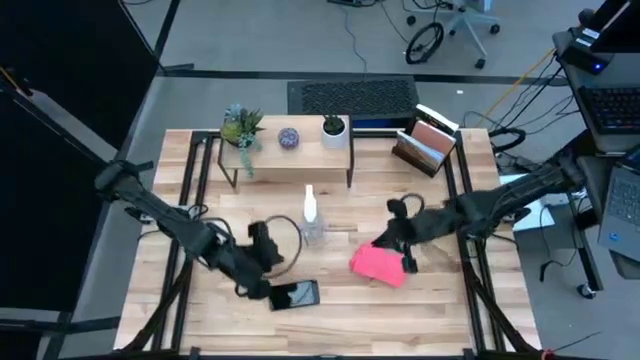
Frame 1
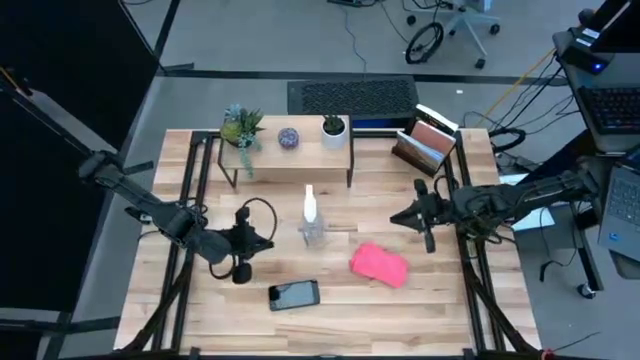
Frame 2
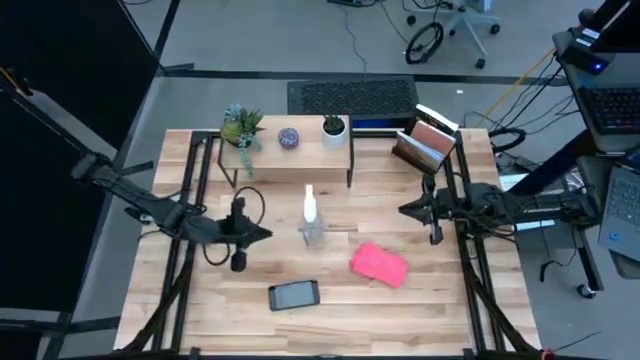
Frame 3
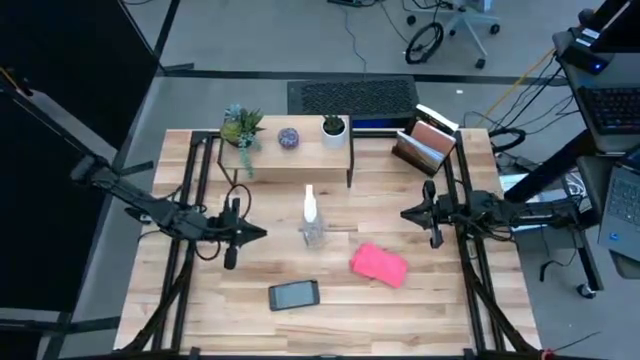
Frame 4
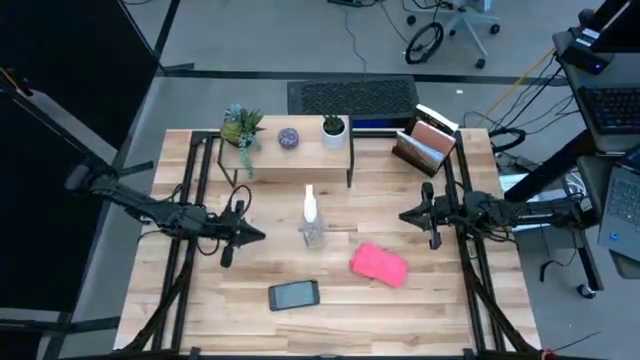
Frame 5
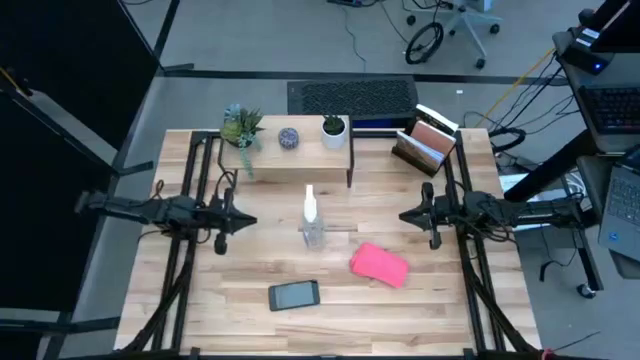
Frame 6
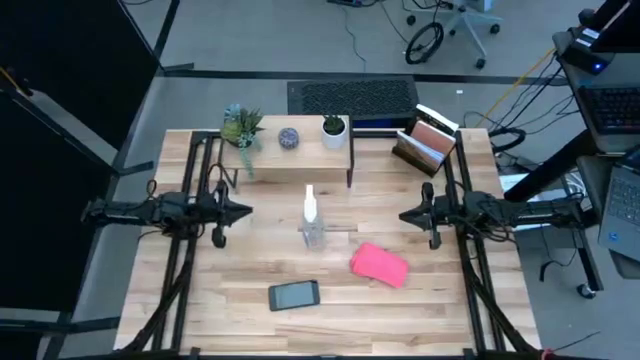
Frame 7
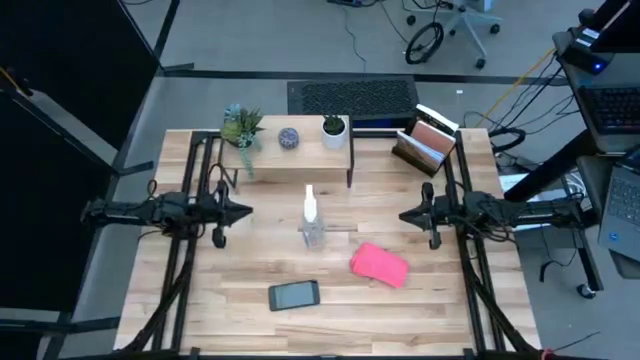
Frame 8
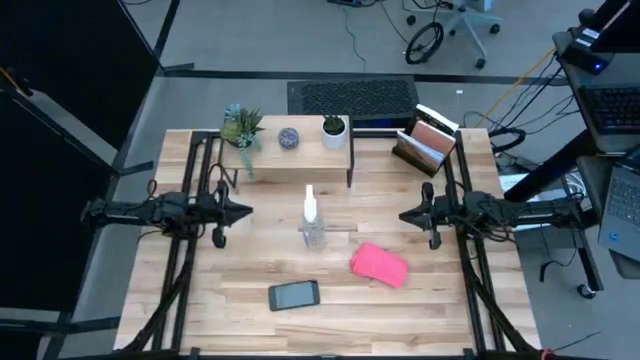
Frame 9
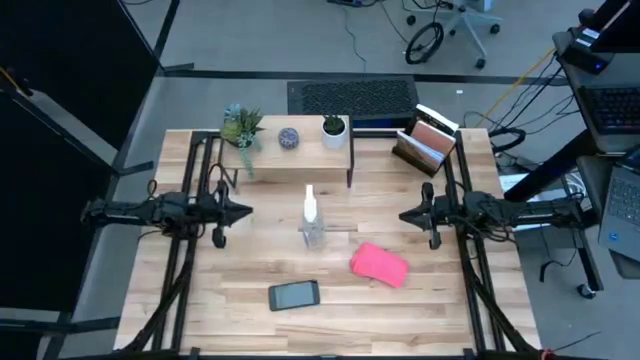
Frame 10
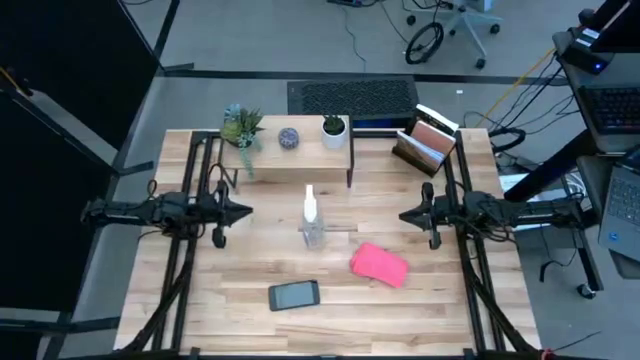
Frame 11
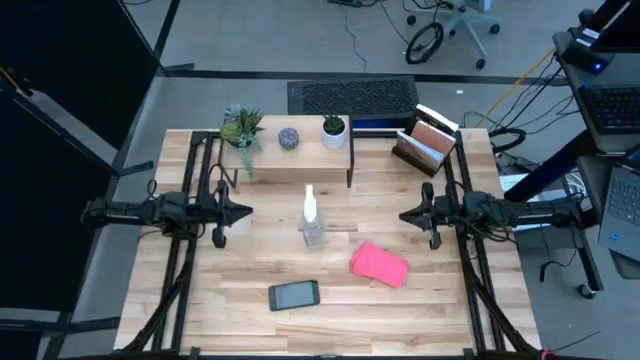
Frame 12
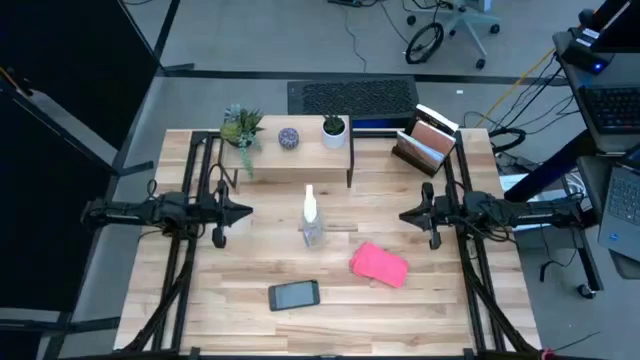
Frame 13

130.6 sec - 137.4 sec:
Task: Apply microfiber cloth
Return to Home Position

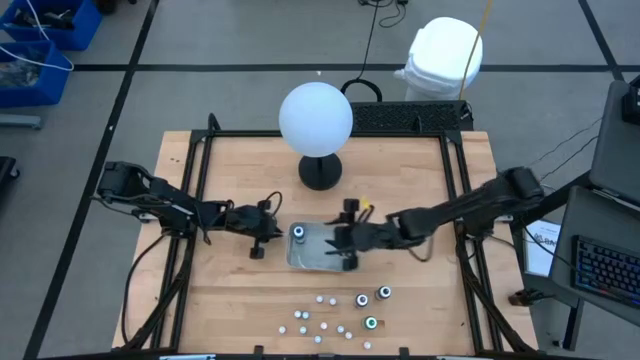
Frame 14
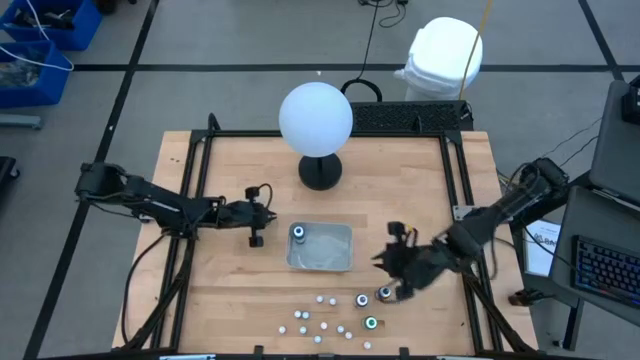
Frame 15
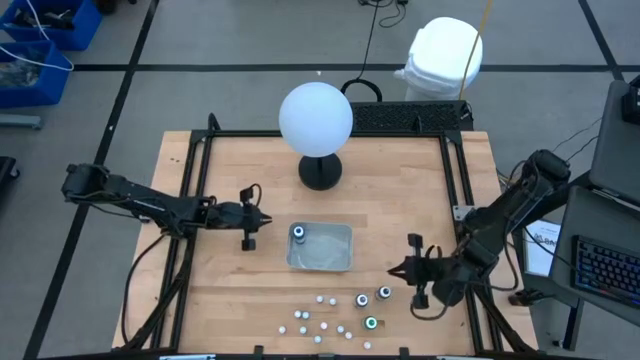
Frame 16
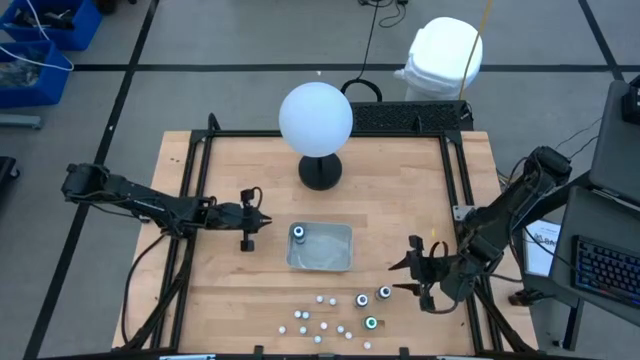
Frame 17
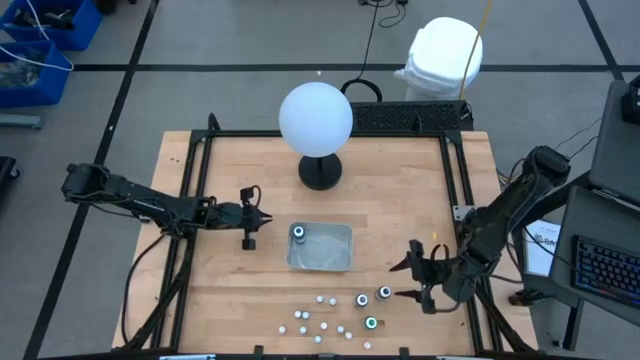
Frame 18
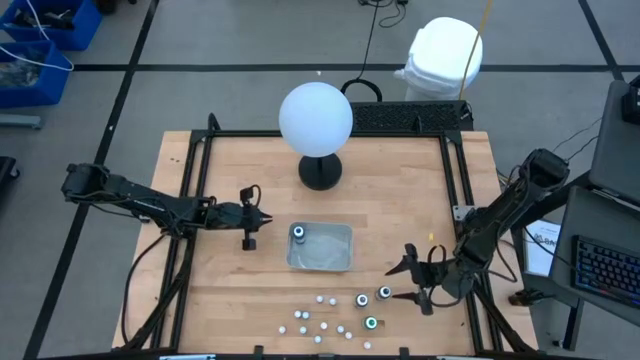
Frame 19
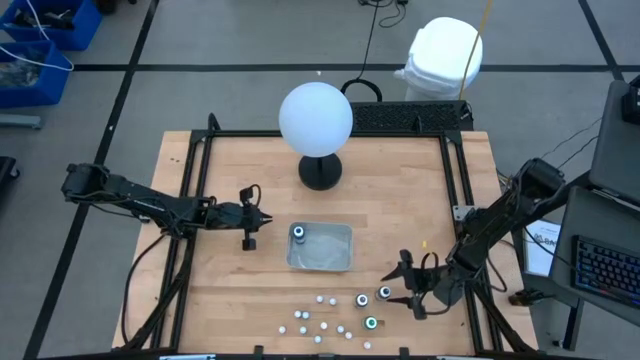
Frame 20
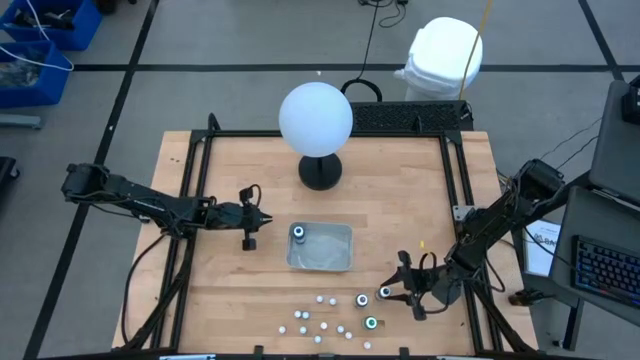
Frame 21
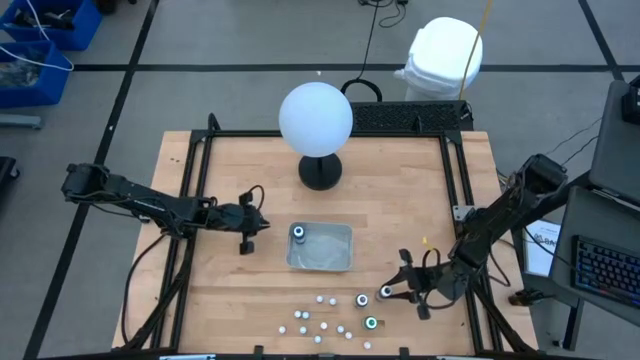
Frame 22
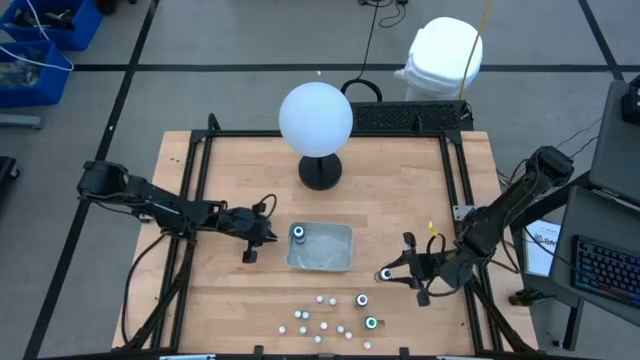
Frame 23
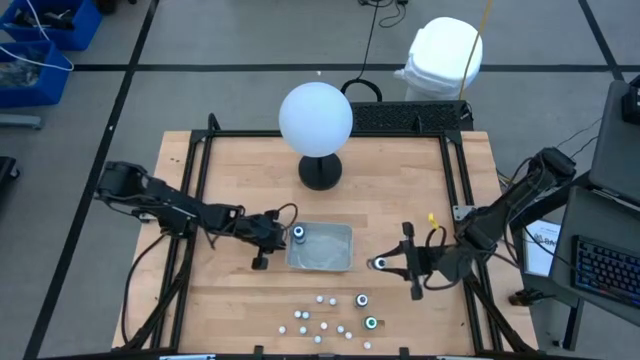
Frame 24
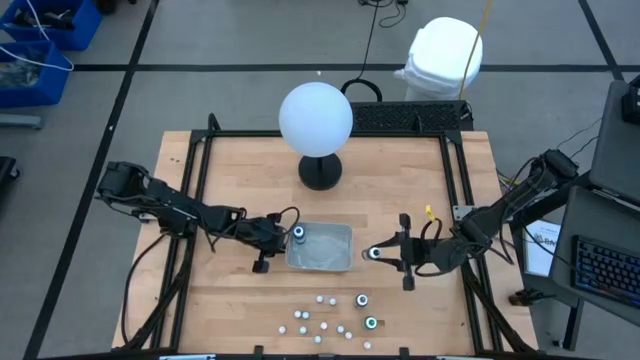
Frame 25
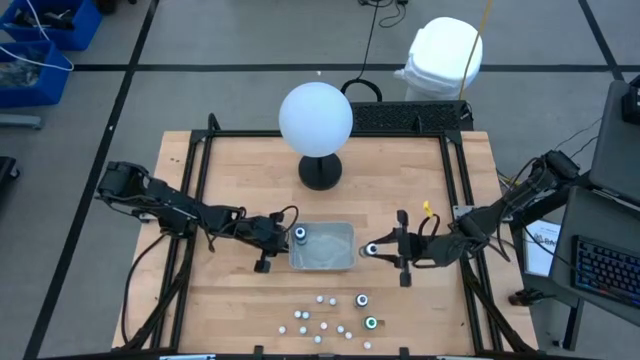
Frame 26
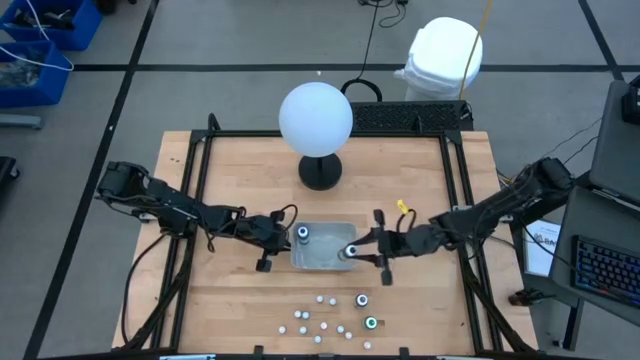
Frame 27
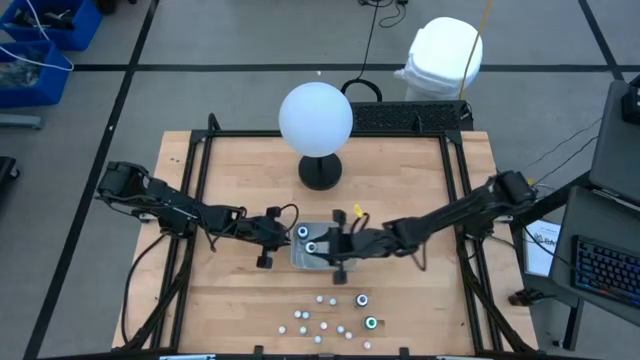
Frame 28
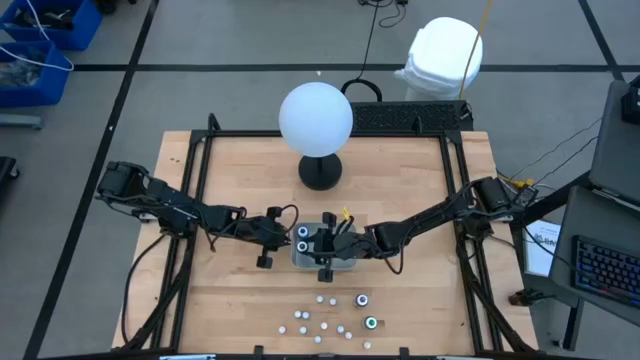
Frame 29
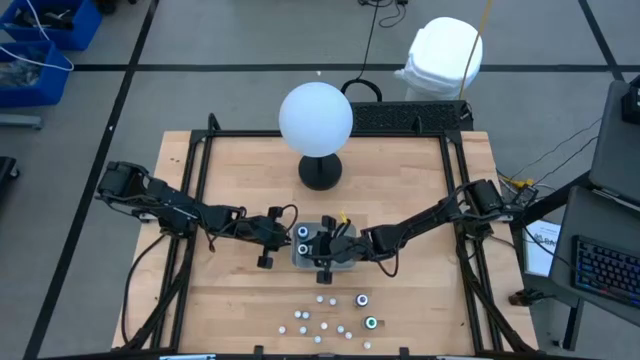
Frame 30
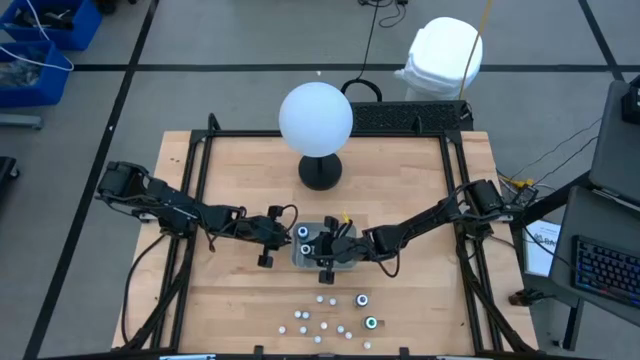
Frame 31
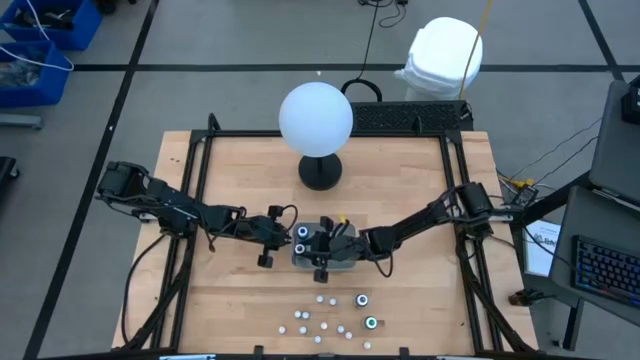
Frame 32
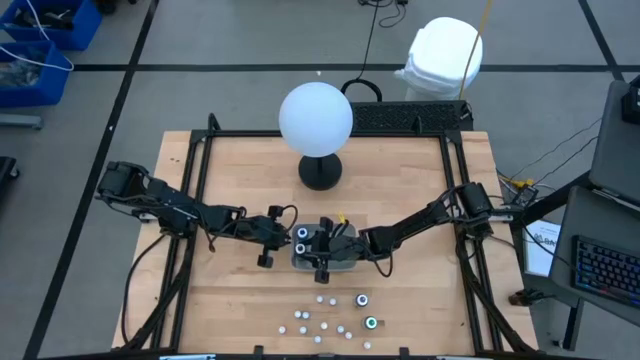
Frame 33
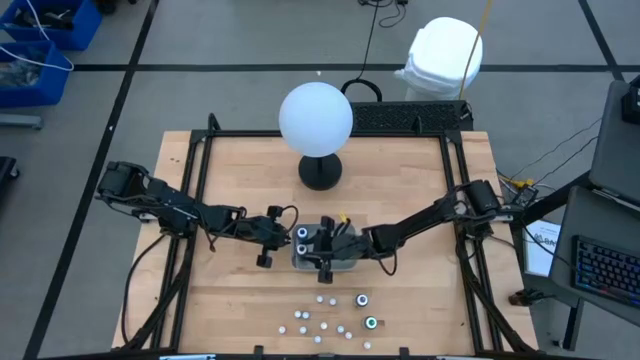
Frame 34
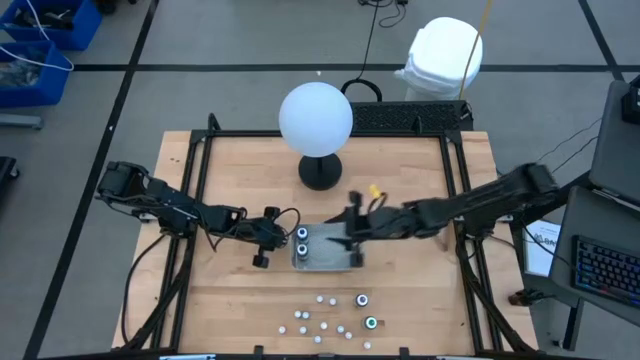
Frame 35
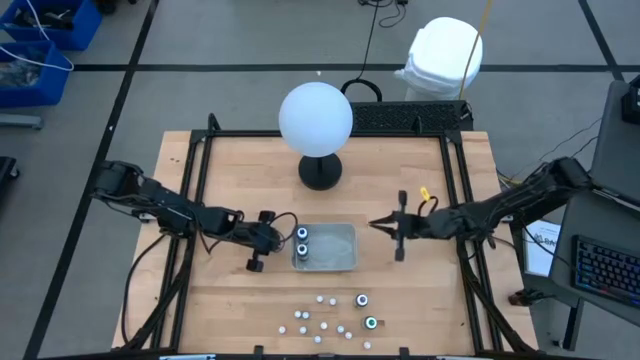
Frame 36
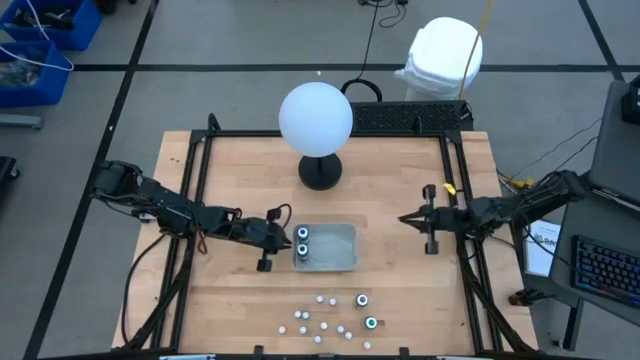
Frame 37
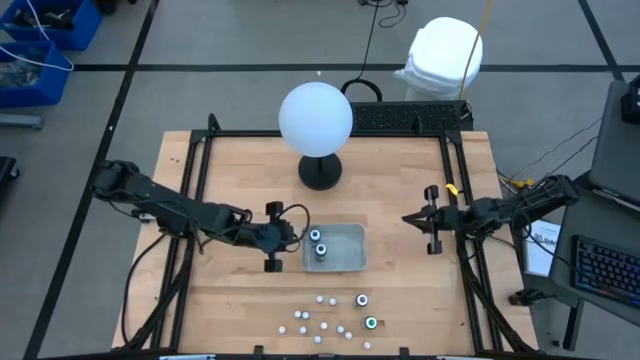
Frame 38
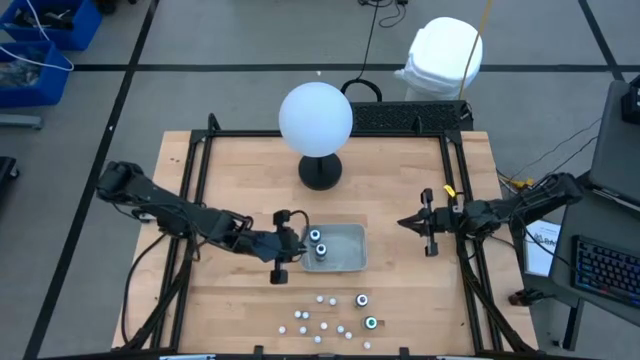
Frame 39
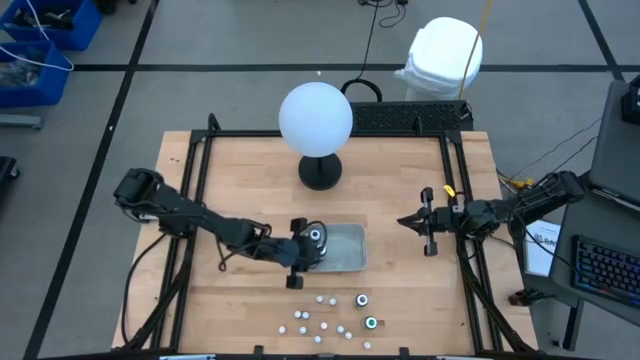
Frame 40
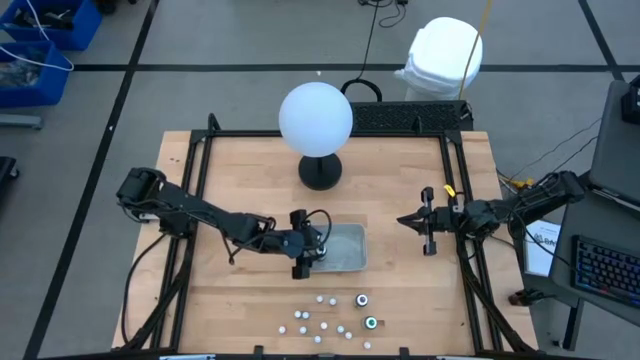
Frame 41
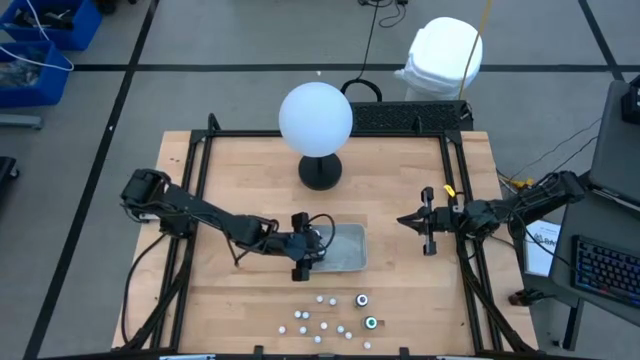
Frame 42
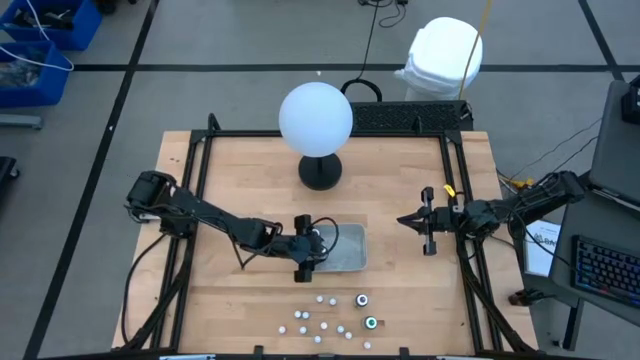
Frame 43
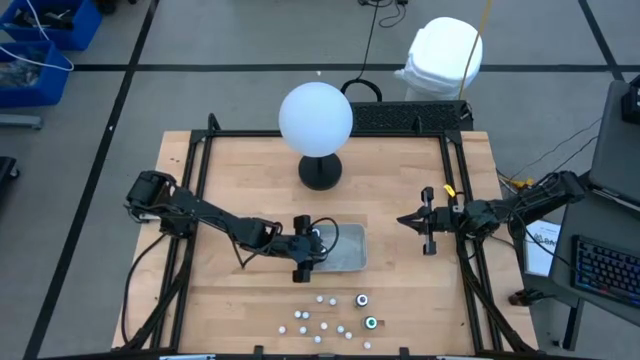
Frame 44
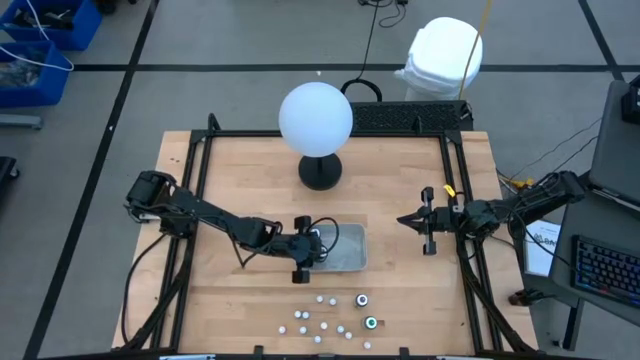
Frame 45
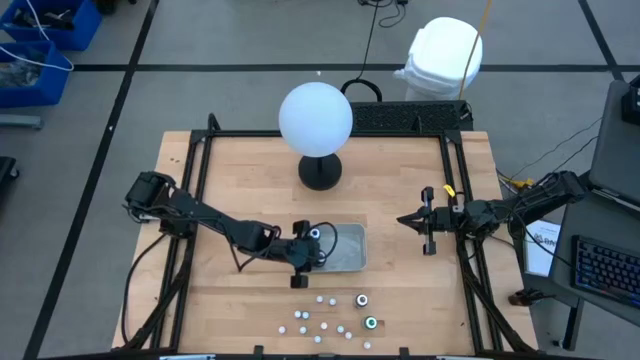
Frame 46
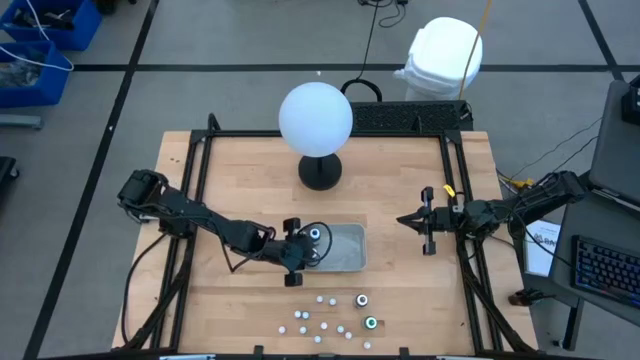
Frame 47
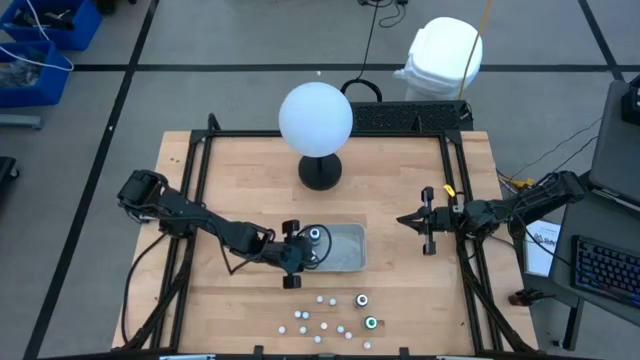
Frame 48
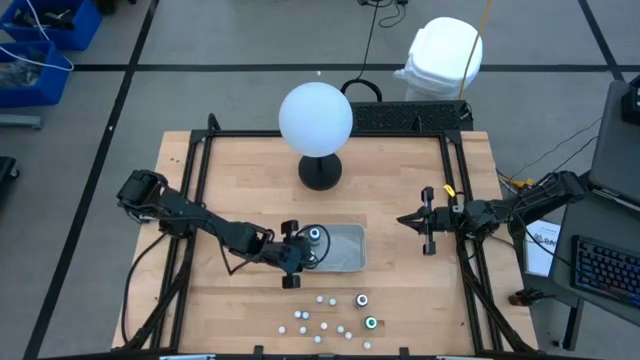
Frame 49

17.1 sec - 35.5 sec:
Task: Pick & Place food coloring
Put the large black food coloring bottle into the gray bin
